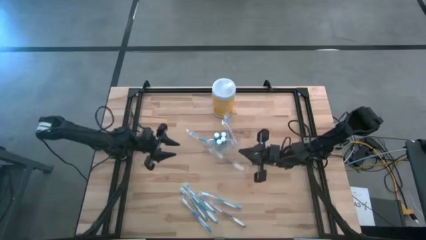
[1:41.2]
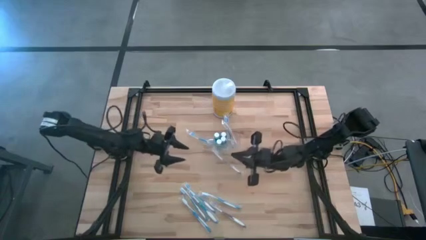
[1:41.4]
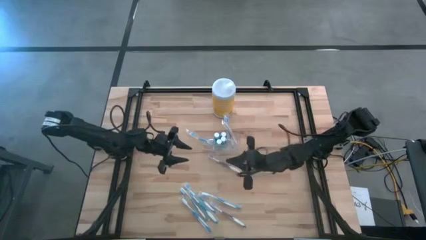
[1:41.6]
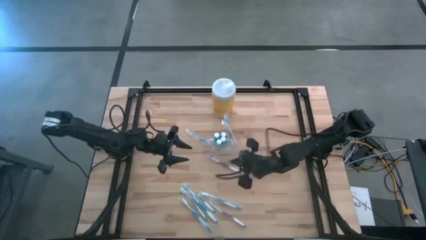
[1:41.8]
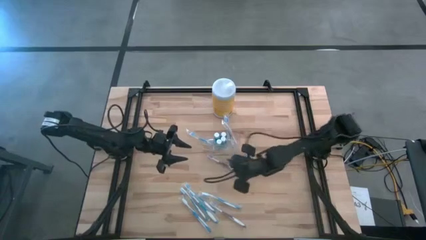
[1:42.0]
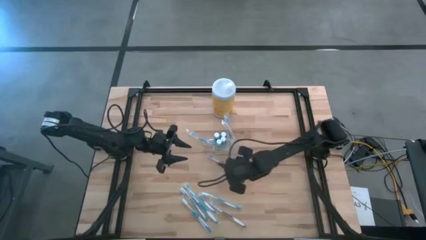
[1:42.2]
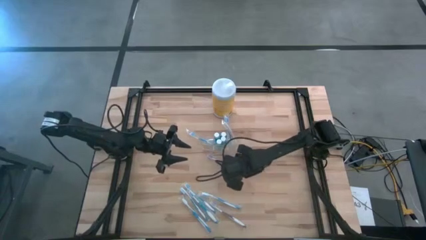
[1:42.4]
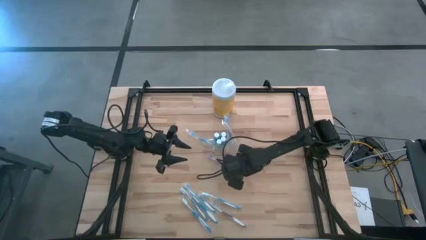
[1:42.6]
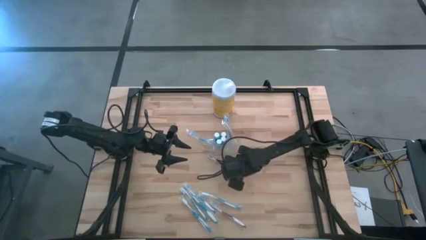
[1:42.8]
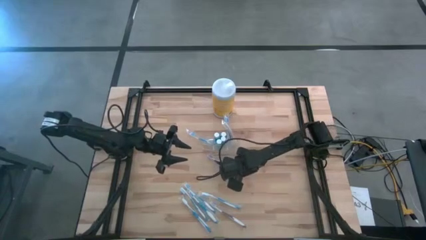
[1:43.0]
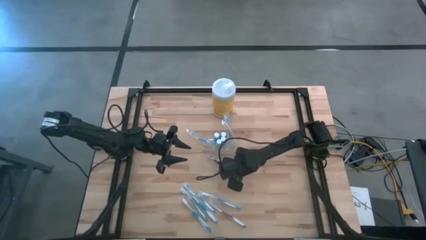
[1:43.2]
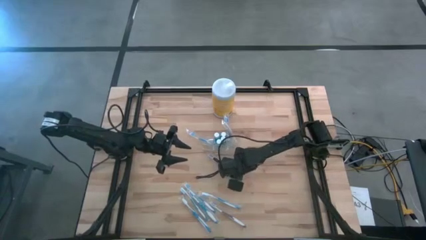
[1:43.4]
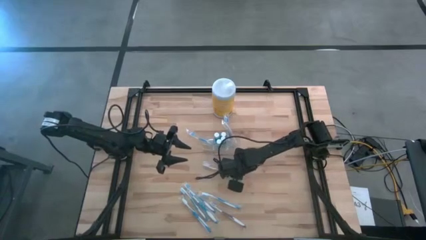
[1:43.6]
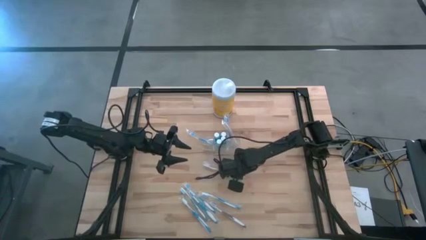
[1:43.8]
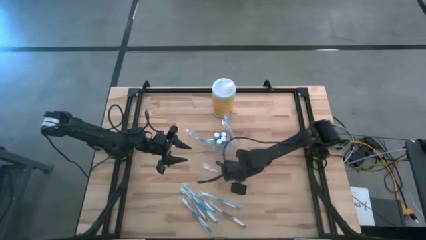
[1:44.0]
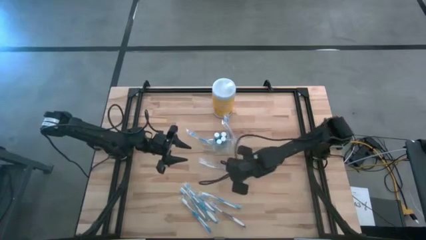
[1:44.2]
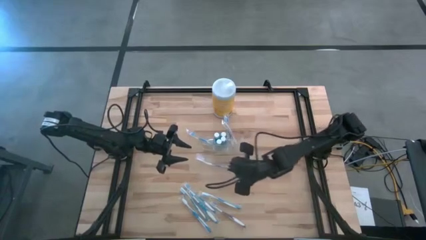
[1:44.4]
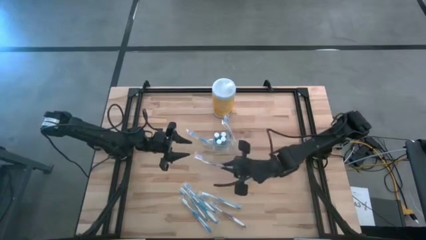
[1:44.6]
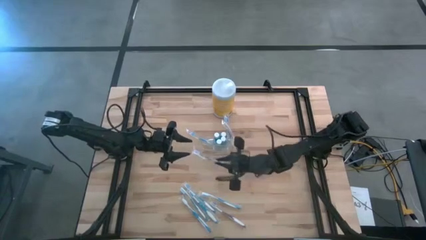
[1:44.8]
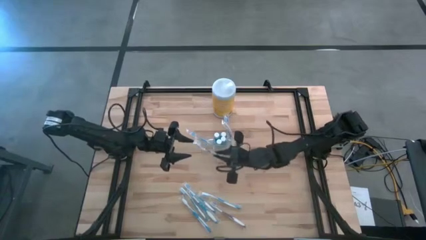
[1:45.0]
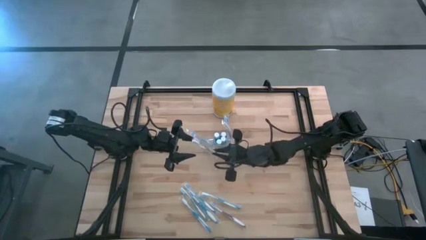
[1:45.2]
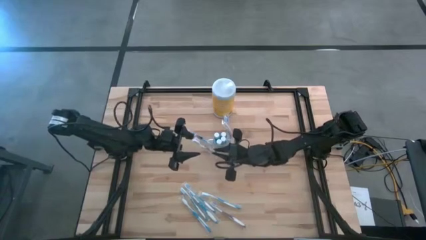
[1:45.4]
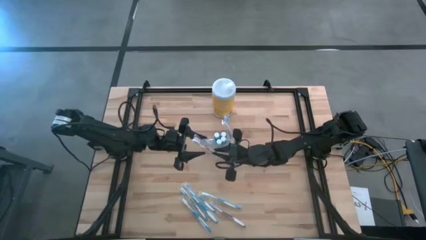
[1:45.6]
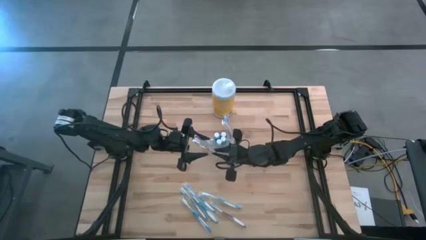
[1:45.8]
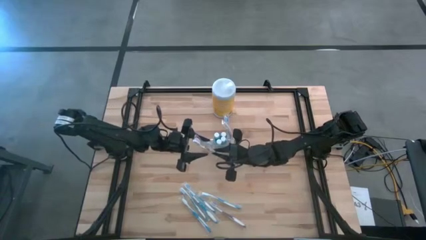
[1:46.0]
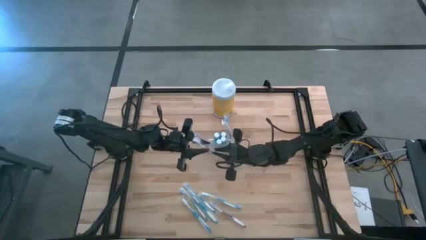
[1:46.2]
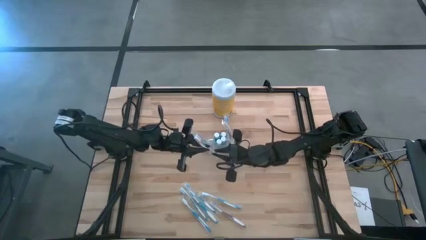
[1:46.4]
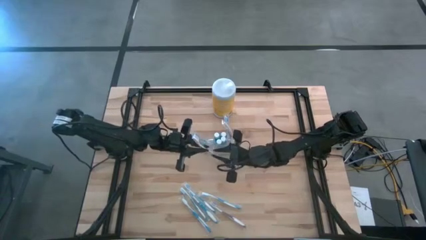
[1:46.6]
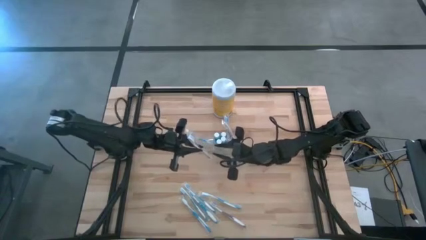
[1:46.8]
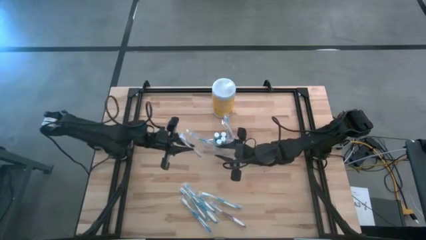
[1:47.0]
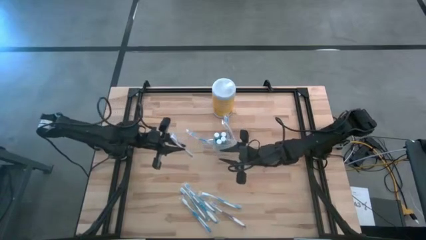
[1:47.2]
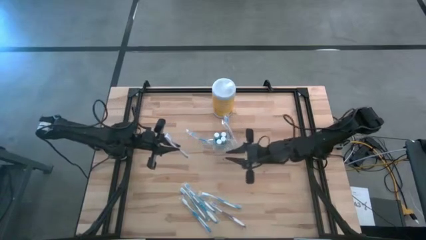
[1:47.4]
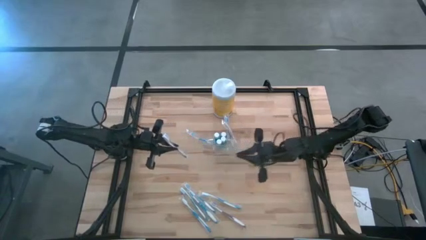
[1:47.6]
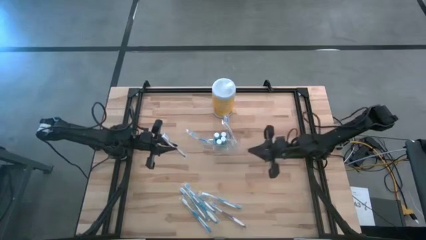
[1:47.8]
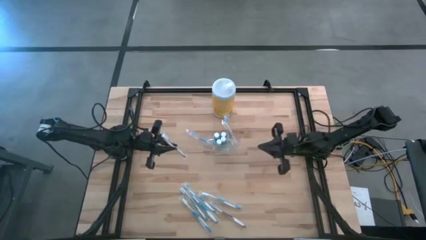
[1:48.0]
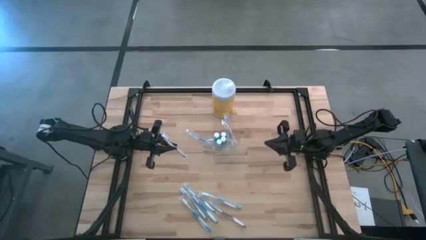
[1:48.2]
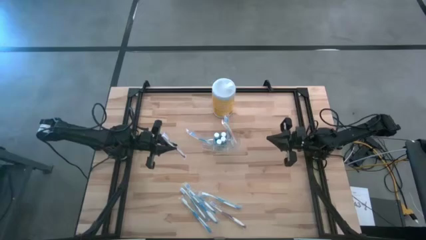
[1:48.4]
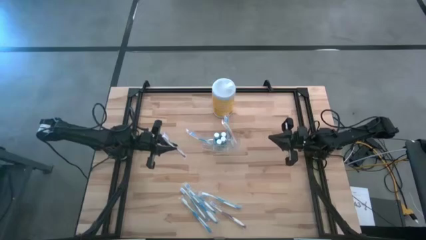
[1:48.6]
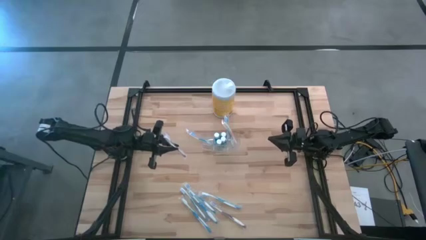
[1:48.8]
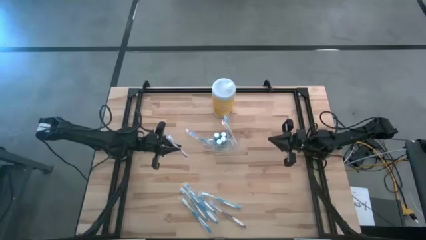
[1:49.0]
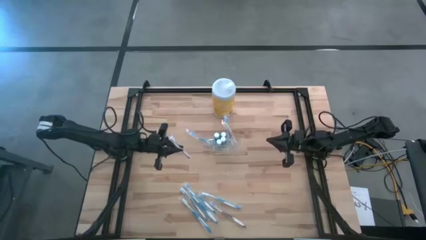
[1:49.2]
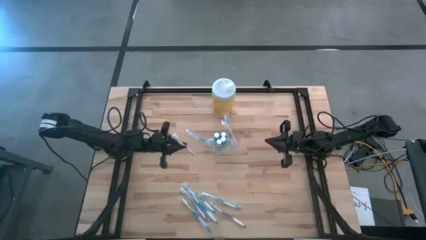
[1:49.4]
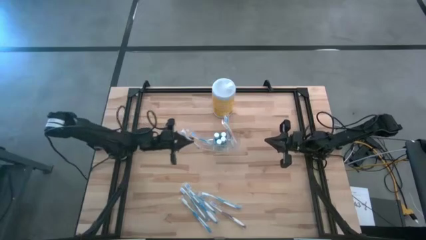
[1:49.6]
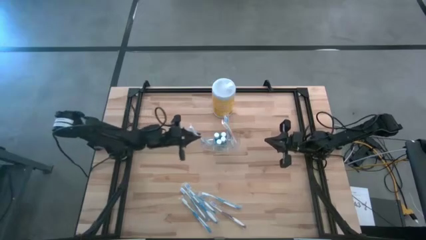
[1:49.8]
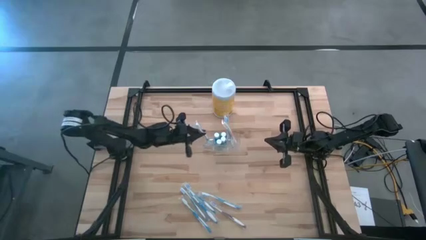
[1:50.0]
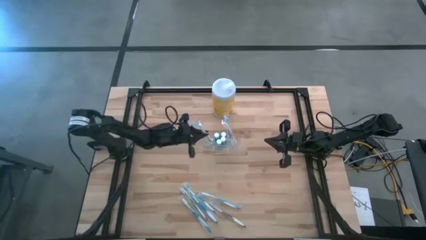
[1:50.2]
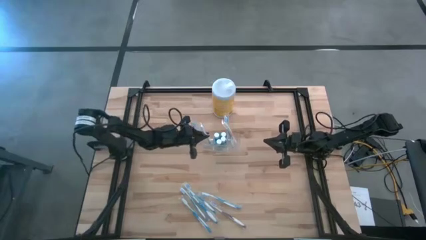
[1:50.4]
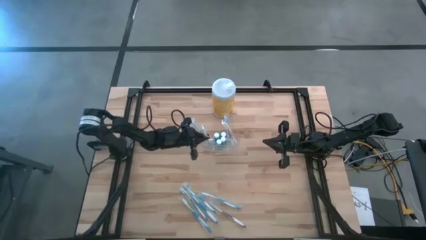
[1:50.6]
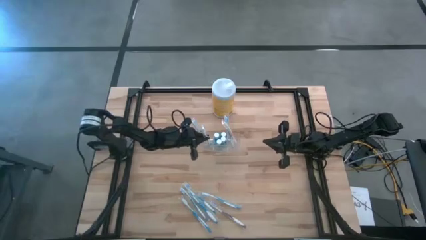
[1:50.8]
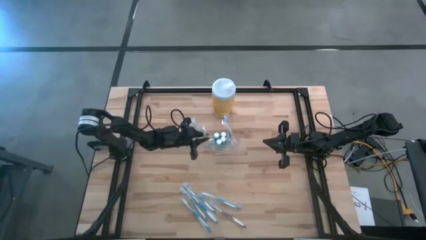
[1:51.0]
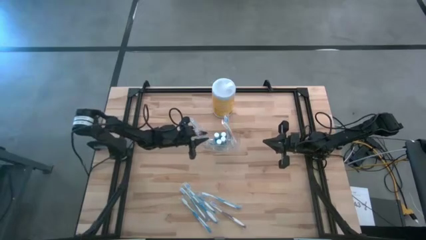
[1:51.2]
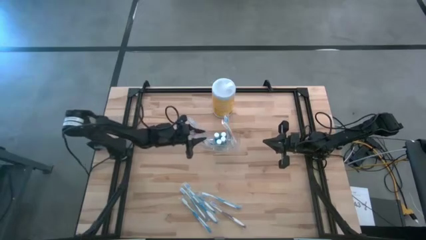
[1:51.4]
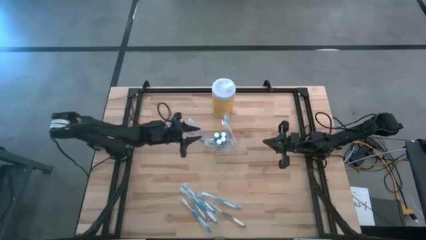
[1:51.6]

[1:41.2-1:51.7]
Task: Pick & Place toothbrushing station
Put the purple toothbrush into the transparent organizer

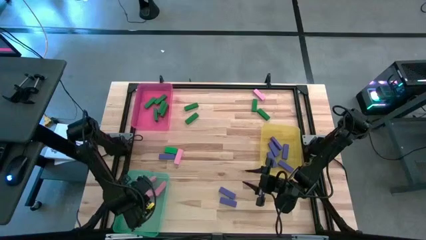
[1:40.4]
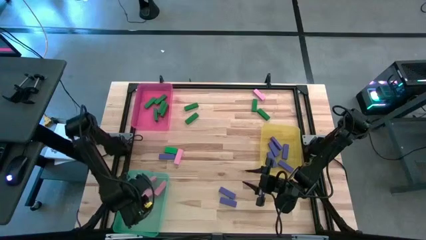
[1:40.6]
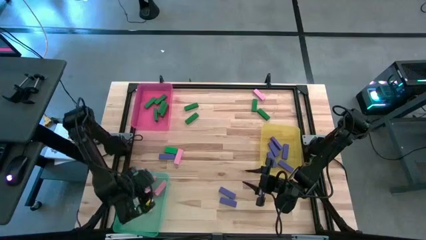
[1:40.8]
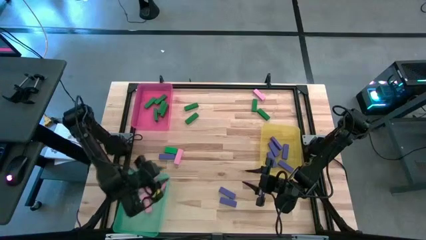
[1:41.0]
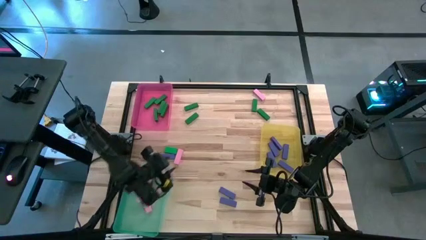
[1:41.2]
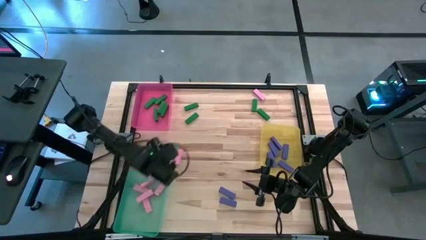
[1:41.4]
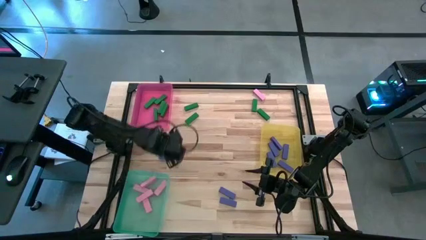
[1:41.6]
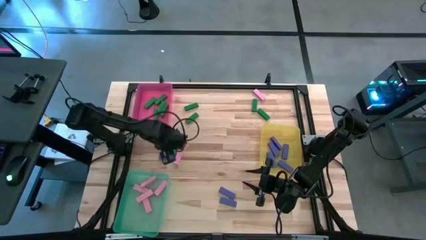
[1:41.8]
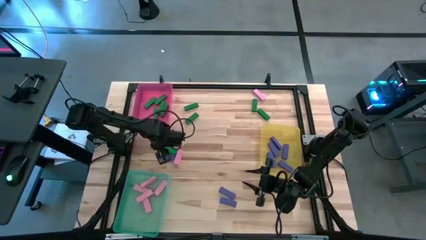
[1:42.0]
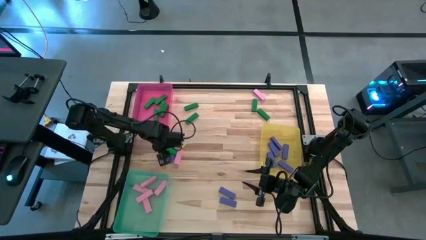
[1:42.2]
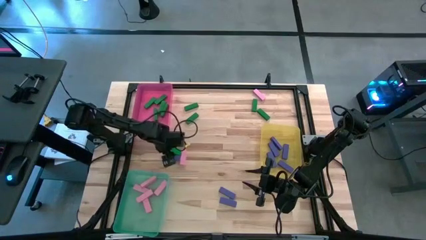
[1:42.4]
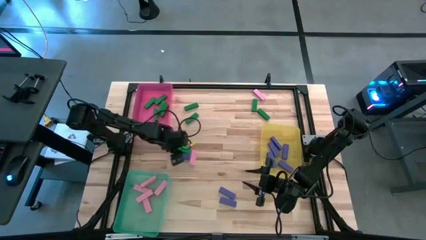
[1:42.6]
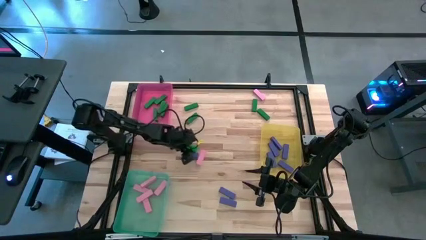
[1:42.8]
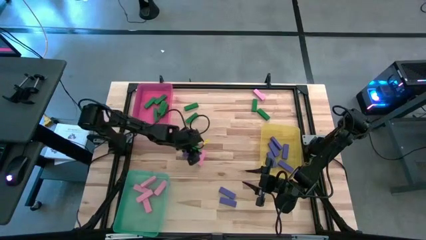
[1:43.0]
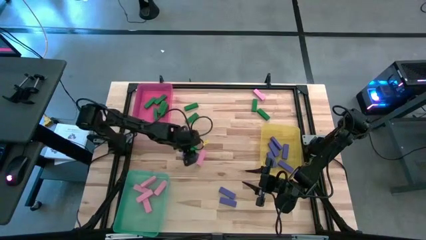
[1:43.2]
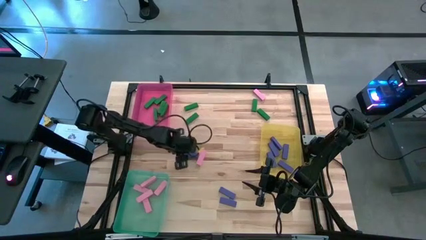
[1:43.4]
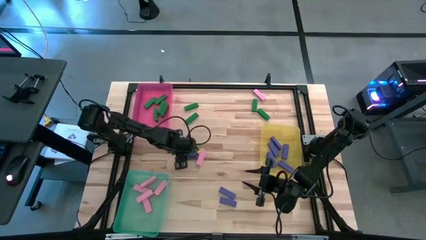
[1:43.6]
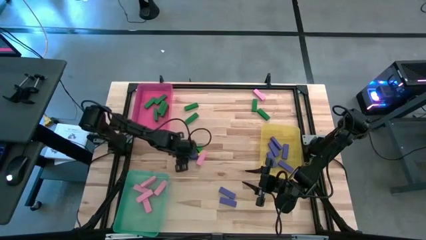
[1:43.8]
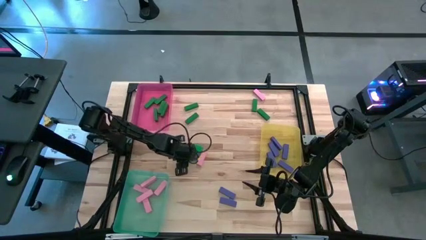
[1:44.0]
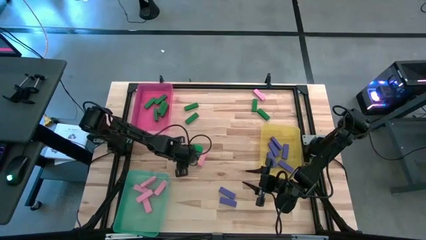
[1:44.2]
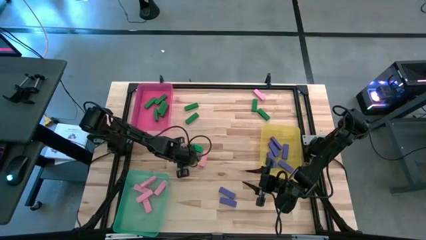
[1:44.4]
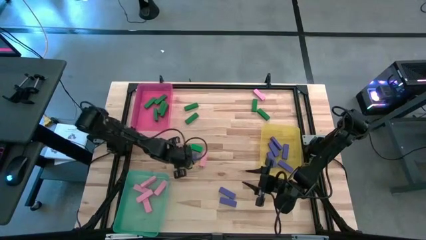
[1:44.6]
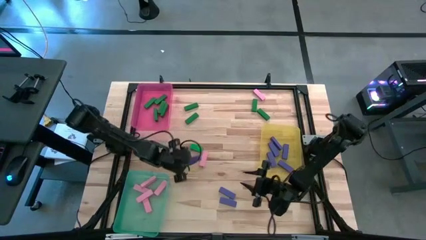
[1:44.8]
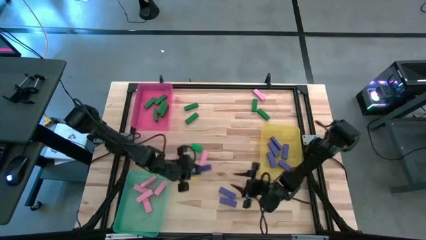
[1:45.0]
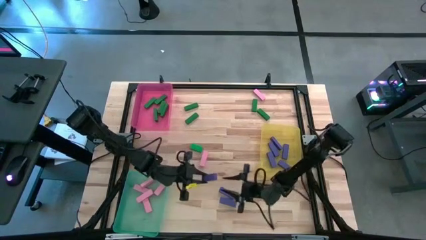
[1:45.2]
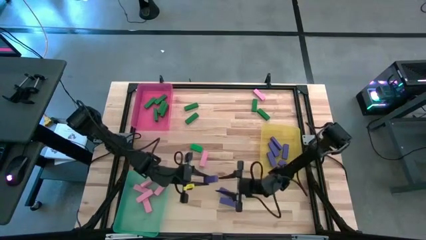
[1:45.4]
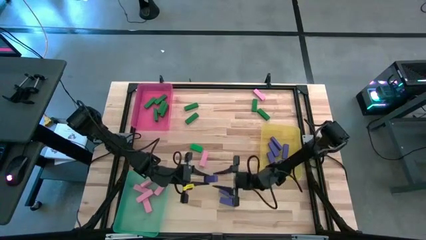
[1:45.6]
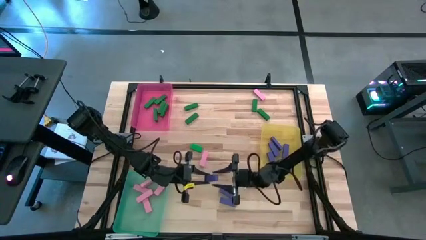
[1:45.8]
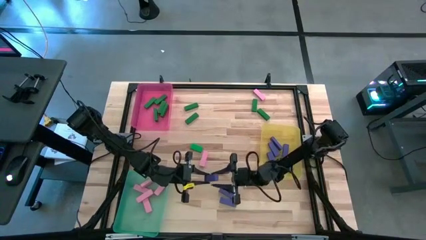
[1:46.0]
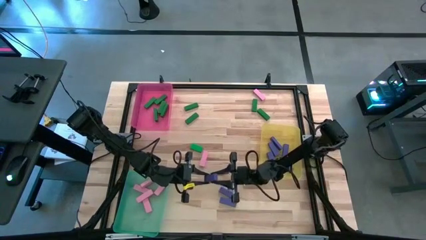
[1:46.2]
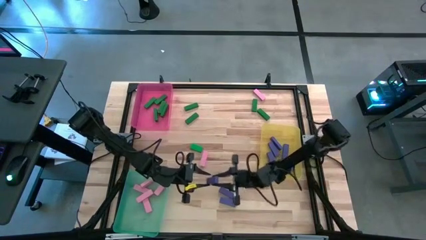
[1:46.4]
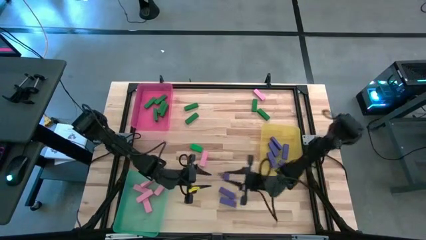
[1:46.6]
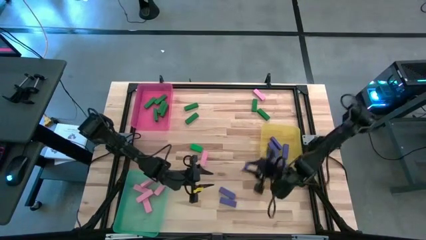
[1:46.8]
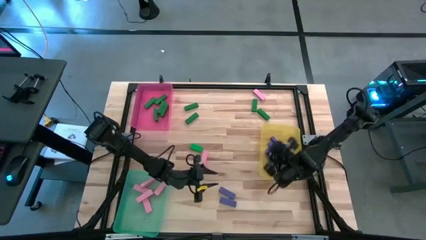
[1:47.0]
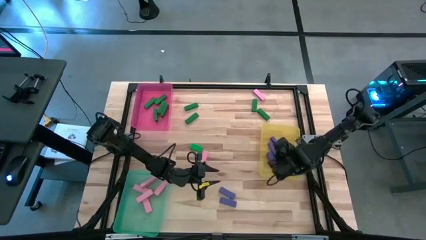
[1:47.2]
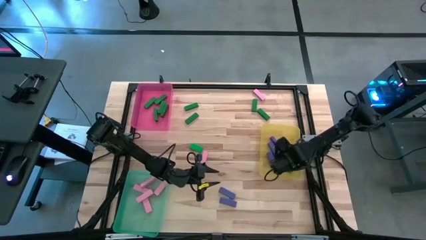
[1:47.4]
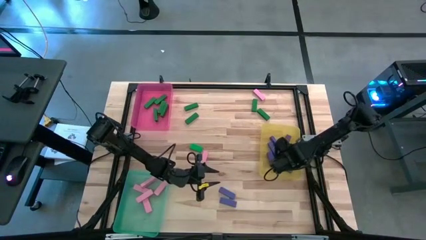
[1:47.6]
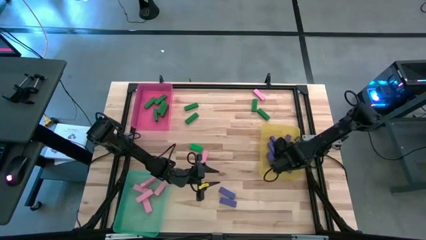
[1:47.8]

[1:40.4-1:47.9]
Task: Sort blocks
Put the blue block into the yellow bin
